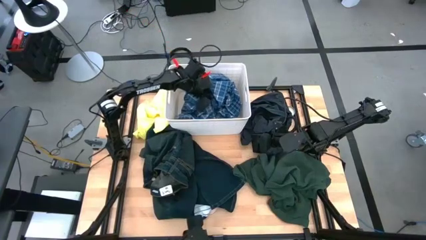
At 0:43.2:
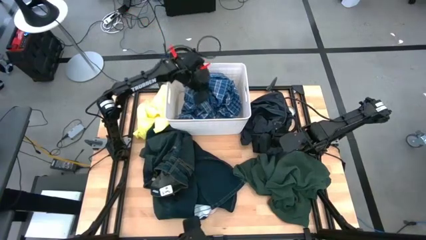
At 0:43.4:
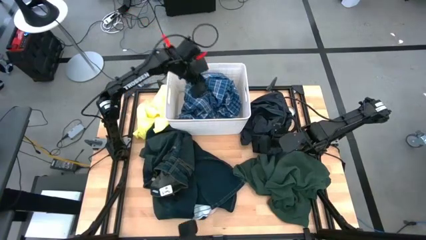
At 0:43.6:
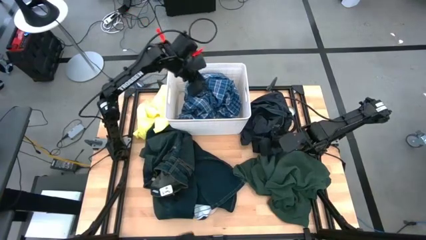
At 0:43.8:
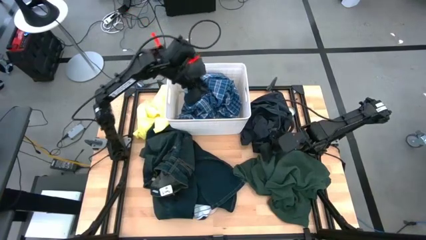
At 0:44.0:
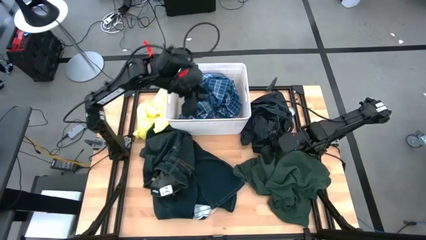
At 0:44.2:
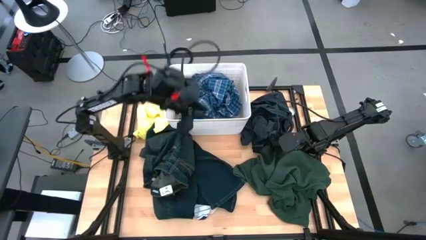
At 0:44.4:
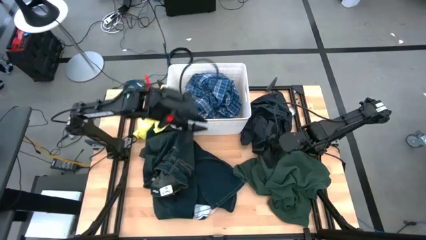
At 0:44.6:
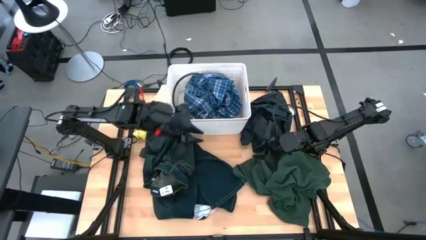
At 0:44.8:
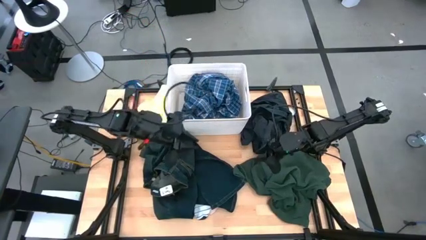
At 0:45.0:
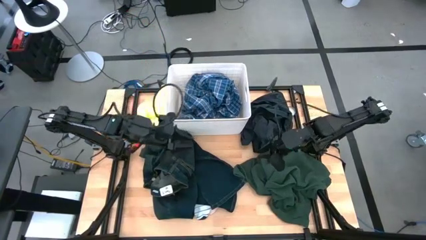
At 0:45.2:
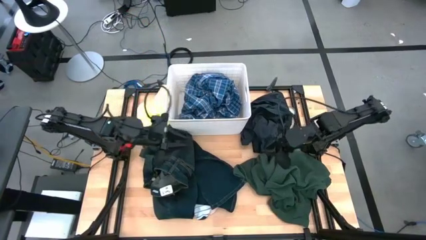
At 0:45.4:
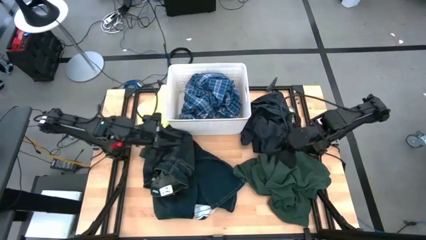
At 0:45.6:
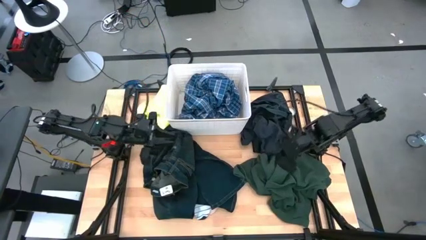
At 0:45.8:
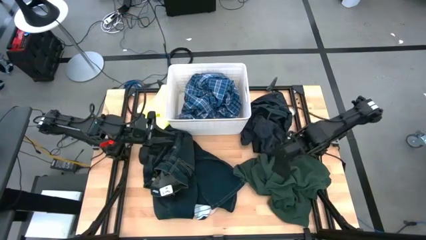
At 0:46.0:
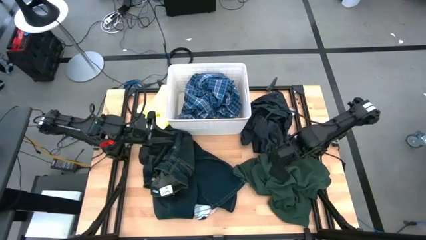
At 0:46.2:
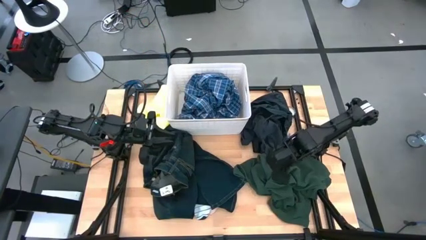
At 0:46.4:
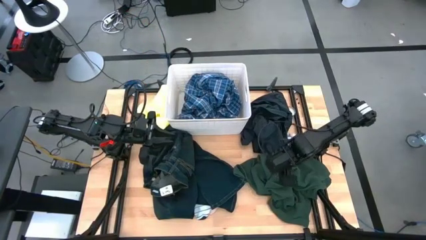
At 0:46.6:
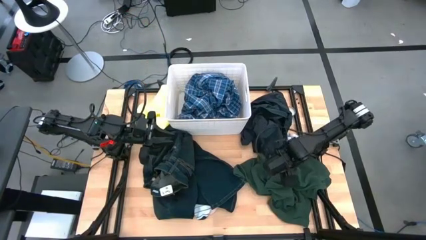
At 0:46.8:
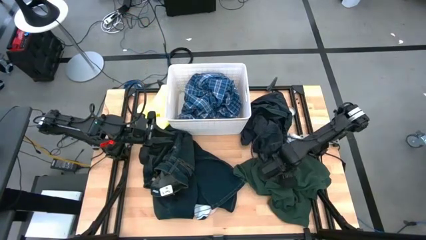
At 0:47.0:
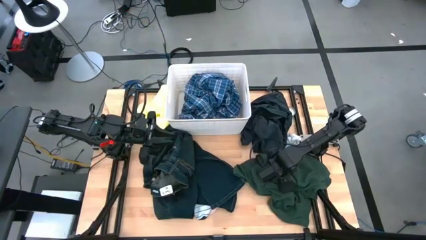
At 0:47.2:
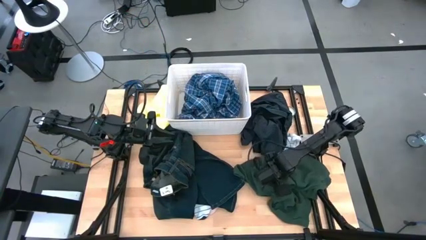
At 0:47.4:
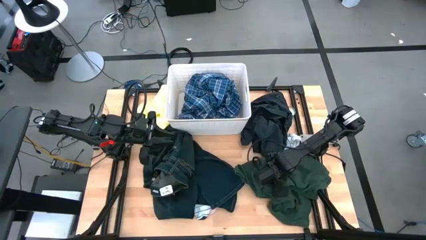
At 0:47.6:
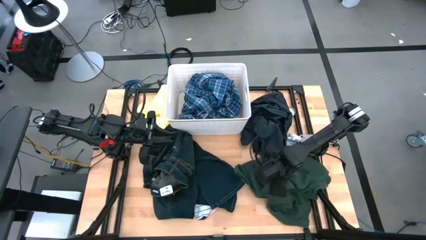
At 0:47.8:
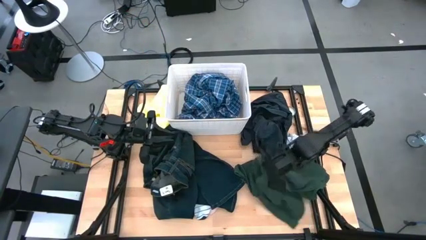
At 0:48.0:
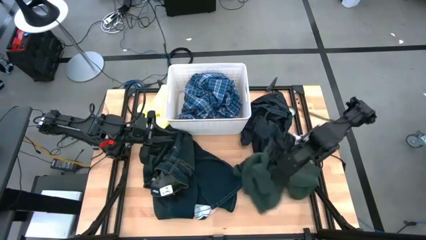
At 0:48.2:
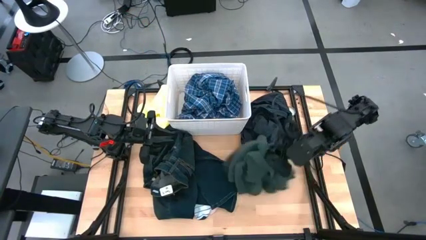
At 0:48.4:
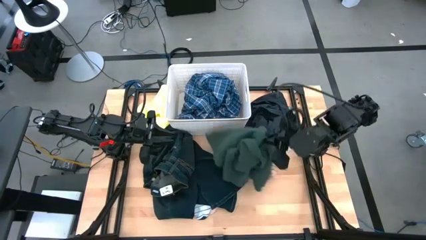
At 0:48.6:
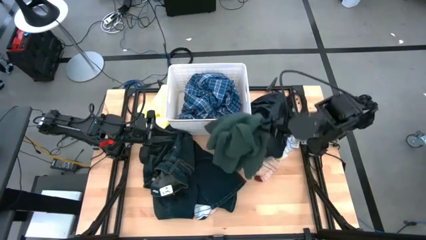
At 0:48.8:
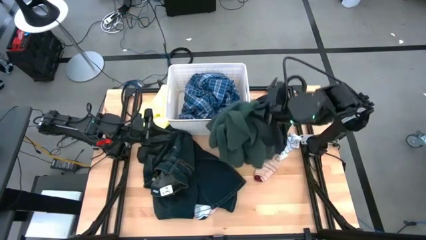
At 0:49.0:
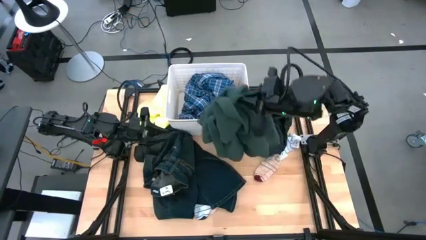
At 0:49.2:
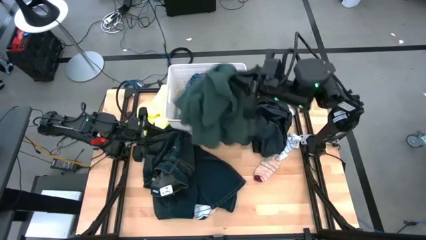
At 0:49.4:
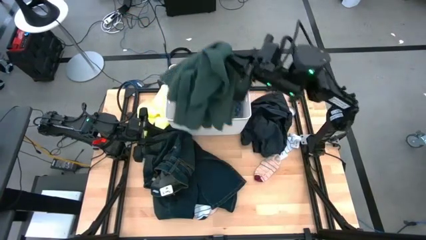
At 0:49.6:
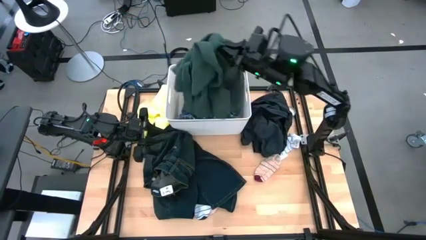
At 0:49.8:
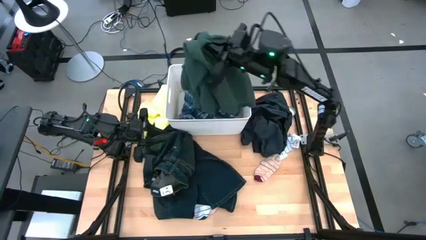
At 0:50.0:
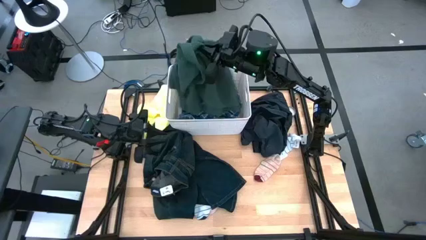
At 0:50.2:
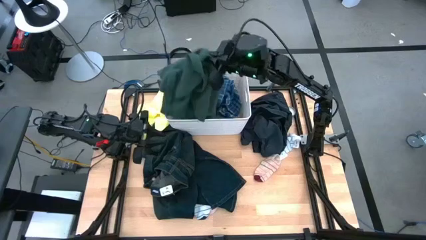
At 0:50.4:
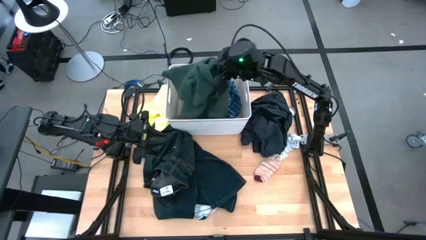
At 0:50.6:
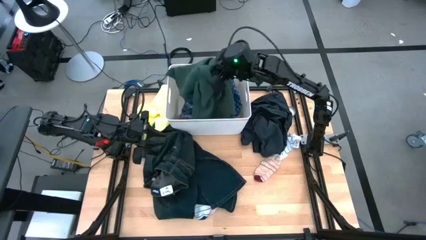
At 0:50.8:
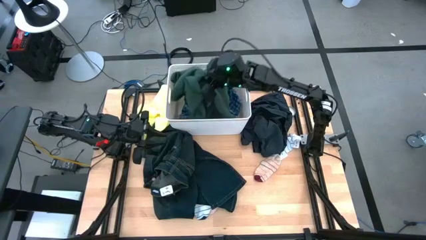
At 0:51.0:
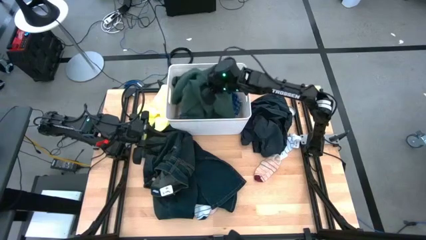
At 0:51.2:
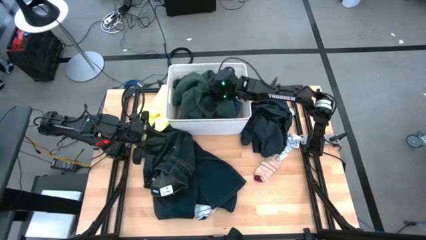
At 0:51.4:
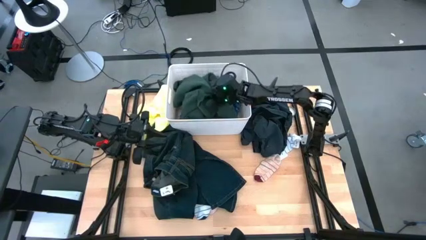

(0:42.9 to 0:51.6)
Task: Sort clothes
Put the green blanket into the laundry organizer

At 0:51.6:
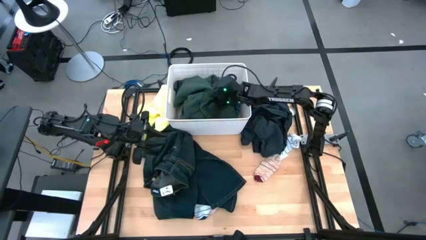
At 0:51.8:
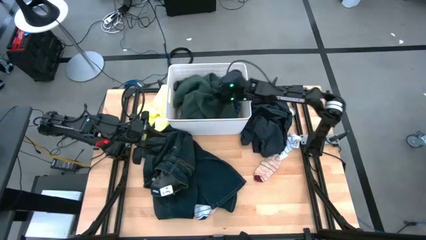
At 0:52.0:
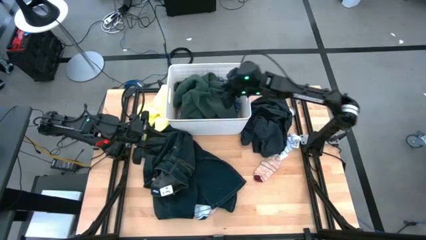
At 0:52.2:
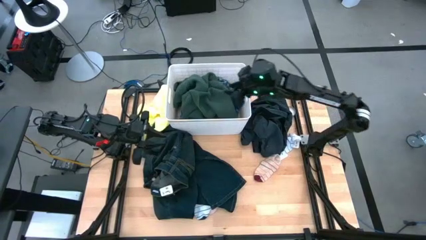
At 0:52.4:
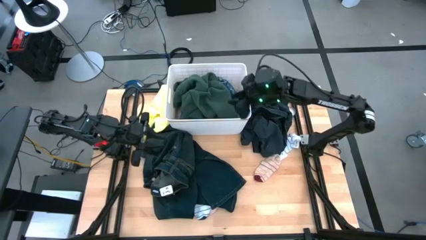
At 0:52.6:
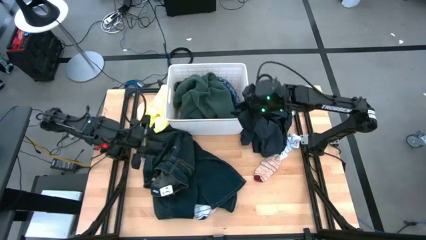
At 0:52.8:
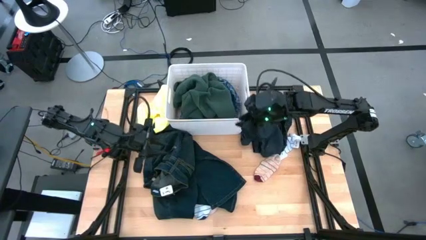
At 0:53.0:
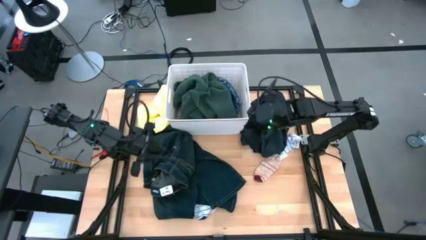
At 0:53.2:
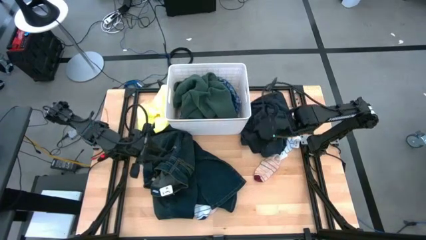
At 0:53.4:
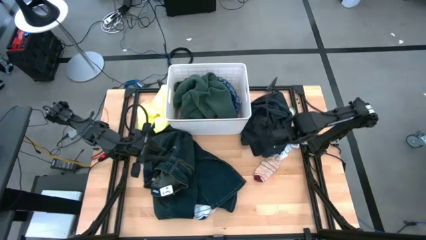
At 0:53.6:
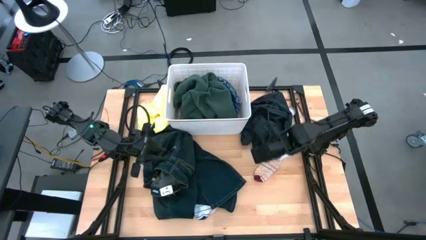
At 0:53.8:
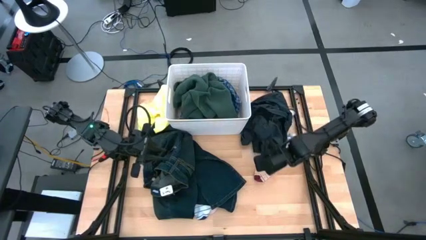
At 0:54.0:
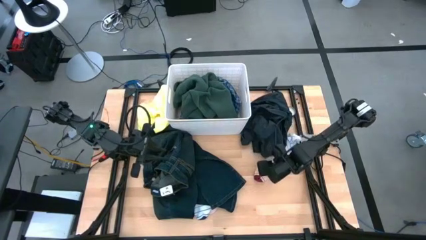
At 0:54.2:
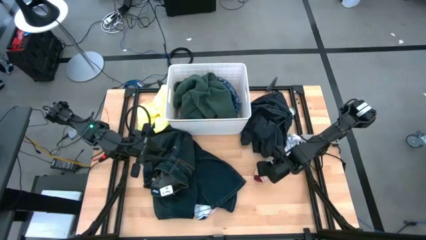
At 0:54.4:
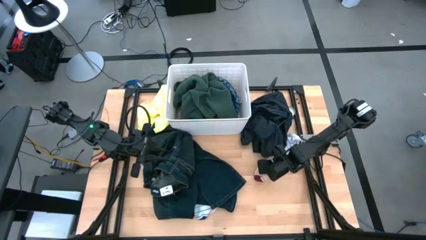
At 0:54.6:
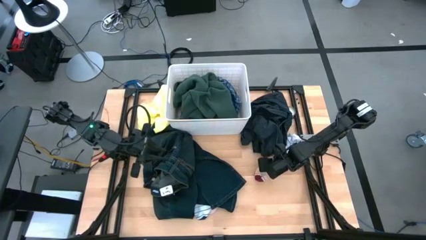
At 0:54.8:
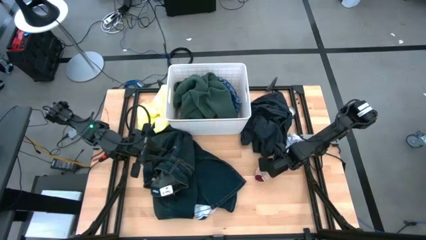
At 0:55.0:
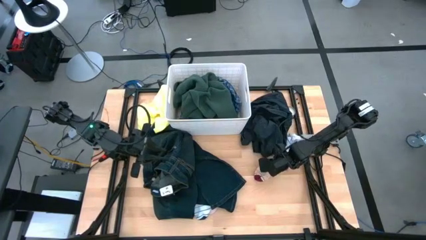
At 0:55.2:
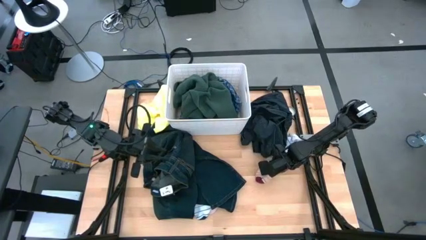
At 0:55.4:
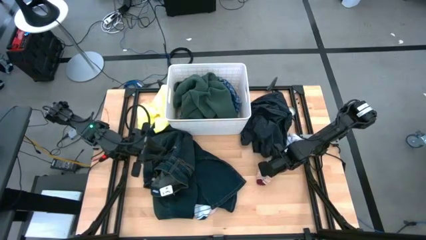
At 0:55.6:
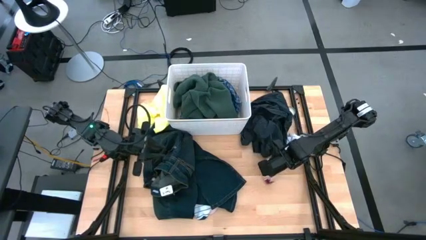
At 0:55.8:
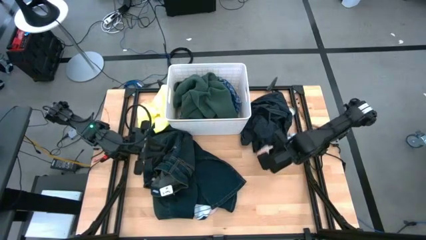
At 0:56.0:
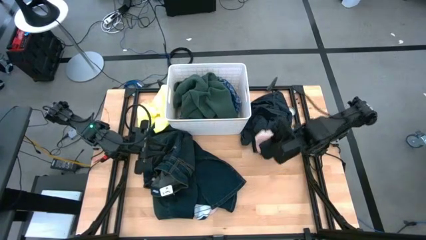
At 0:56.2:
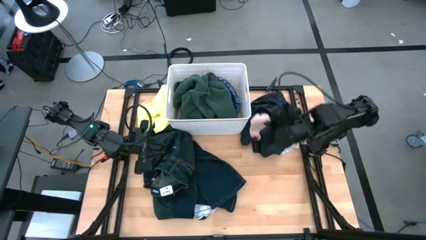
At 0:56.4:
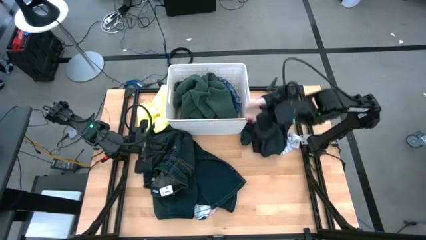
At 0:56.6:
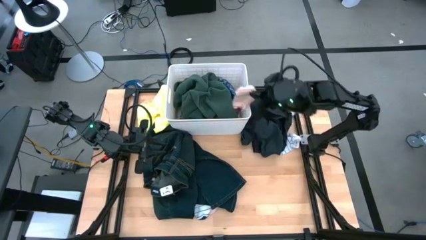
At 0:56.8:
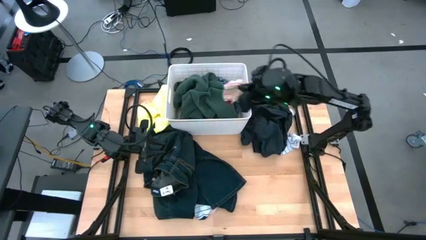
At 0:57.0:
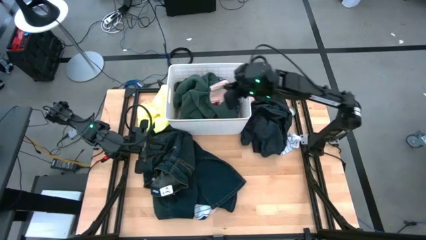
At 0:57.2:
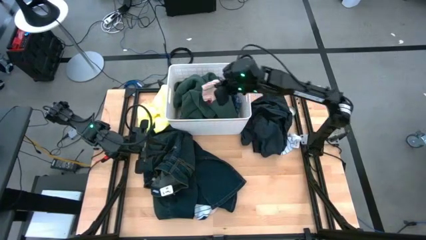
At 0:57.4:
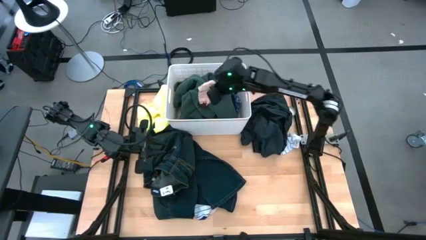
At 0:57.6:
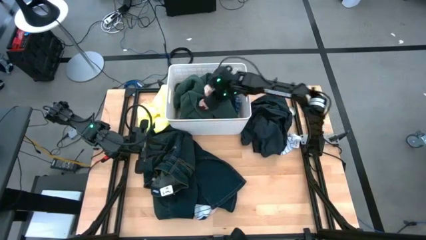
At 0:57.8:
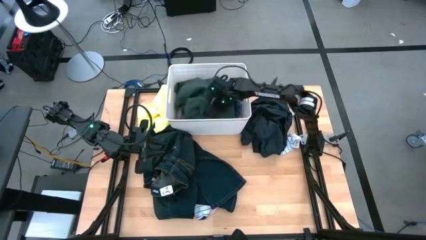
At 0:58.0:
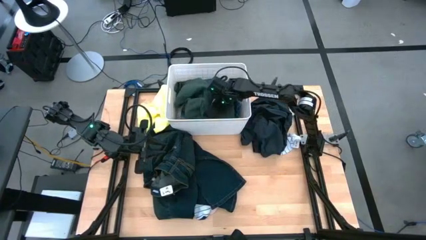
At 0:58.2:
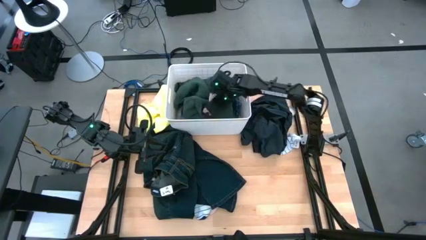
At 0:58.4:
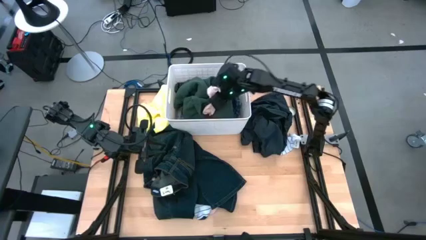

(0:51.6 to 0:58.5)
Put the white pink sock into the laundry organizer
